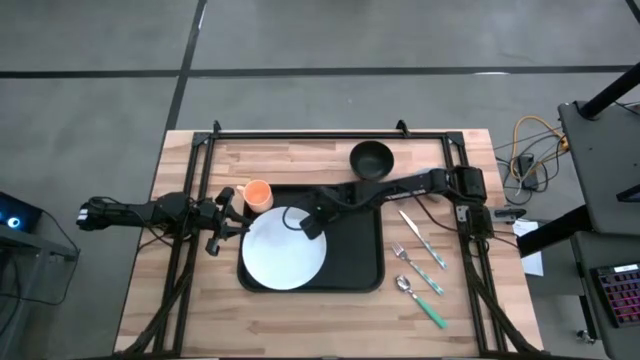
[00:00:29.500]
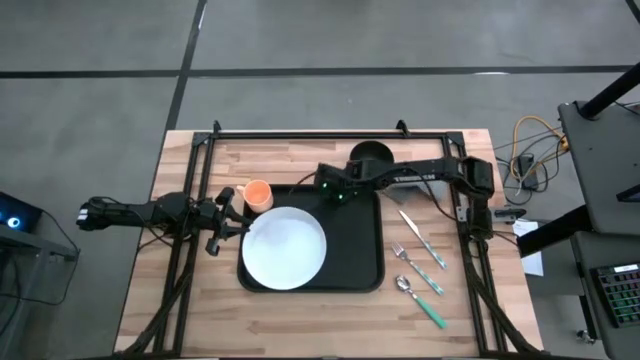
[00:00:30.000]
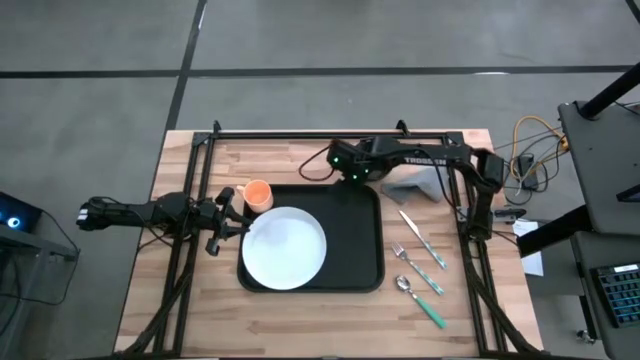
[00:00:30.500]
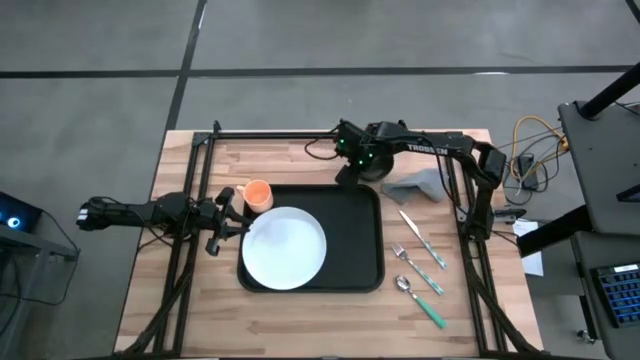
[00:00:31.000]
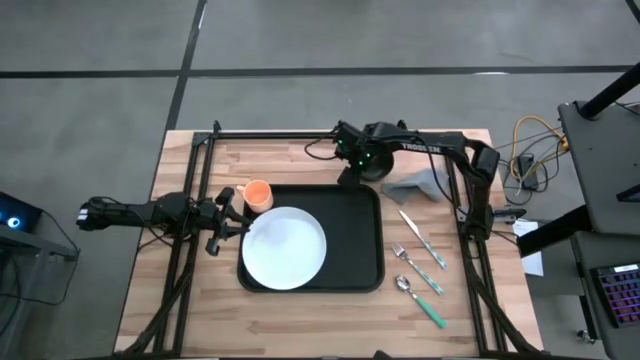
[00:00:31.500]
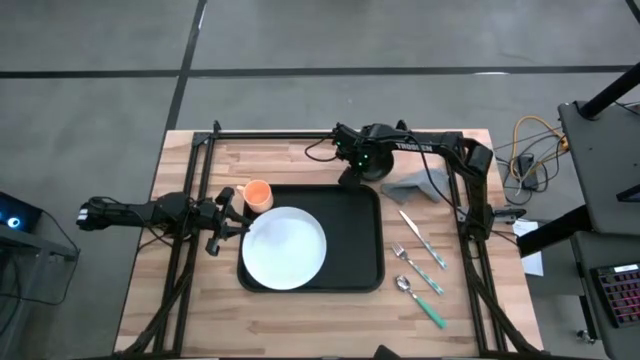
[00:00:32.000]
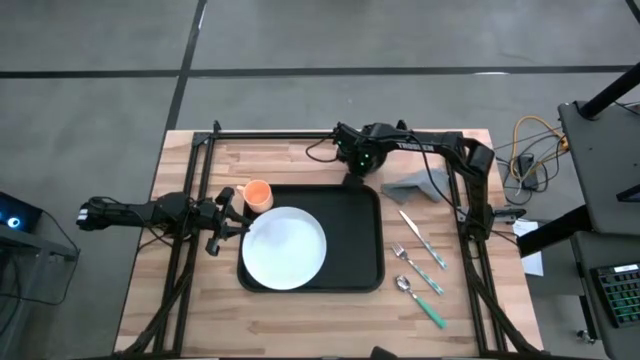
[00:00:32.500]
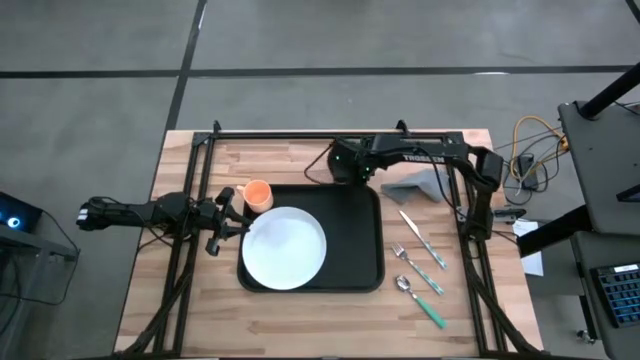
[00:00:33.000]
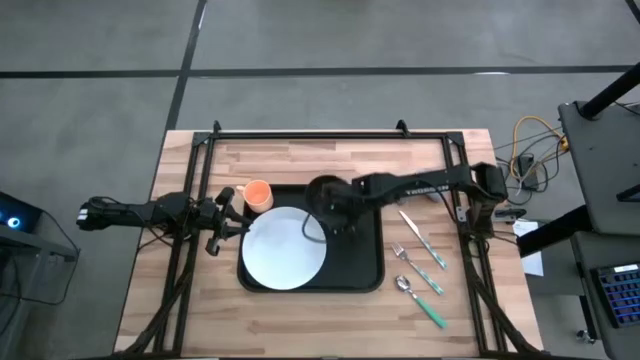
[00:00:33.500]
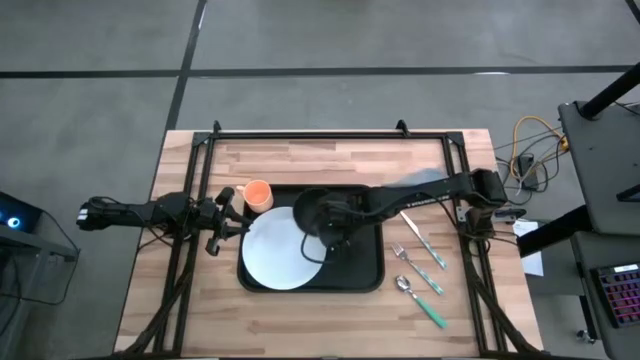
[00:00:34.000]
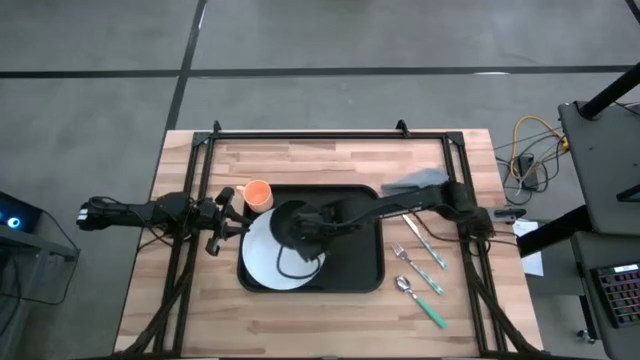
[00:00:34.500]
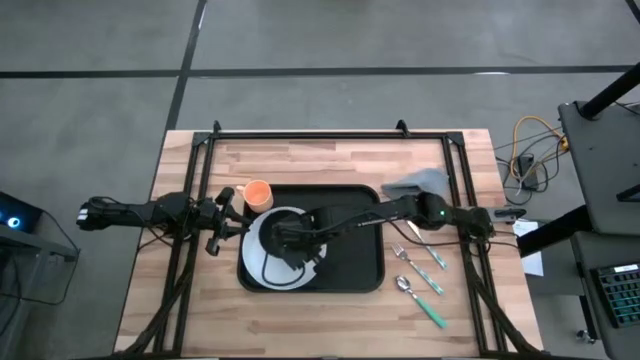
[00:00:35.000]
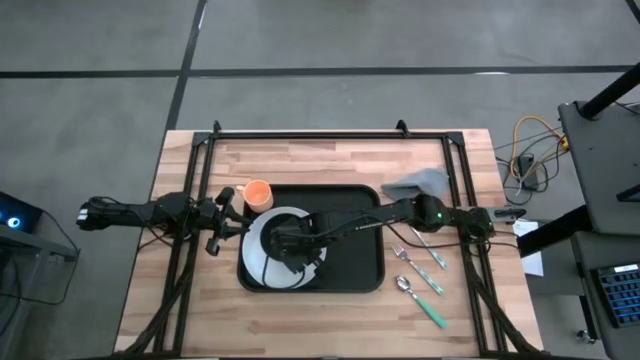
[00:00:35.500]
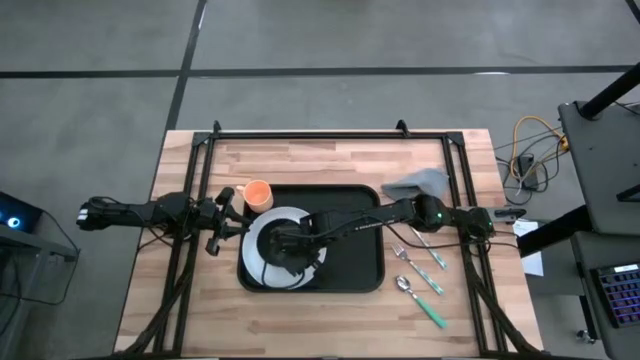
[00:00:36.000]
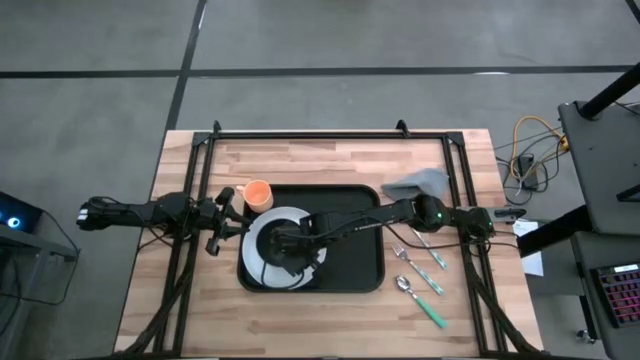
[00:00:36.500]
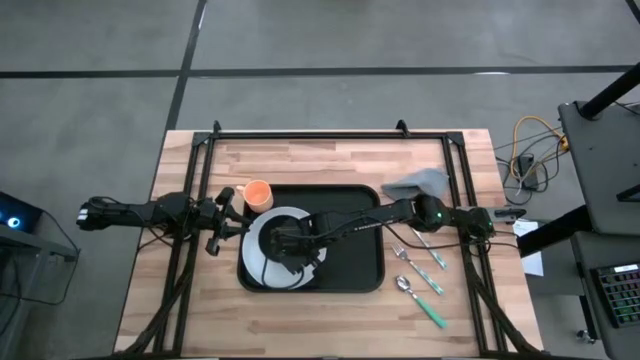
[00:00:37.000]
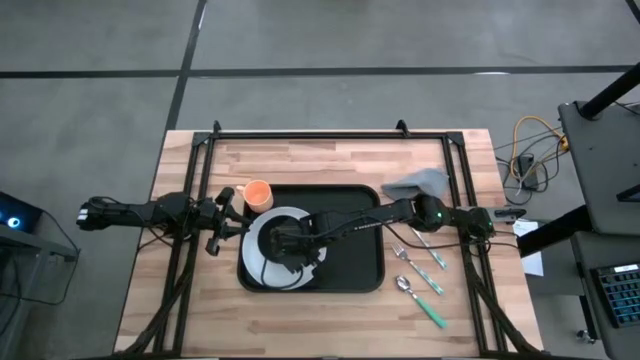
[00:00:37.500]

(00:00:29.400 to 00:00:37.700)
Task: Set up tray
Put the black bowl on top of the white plate

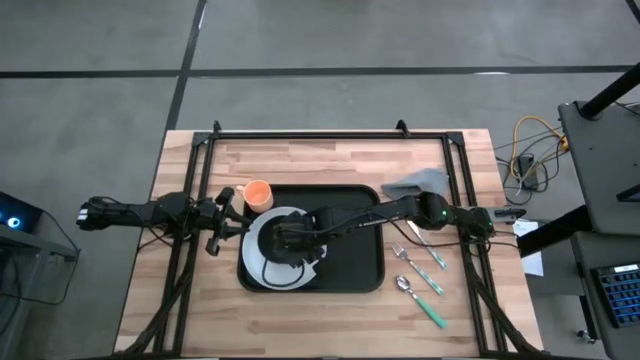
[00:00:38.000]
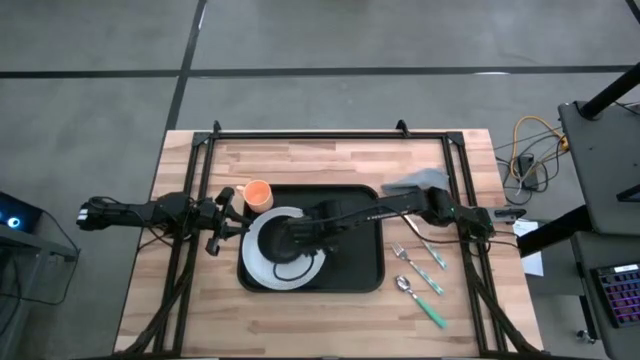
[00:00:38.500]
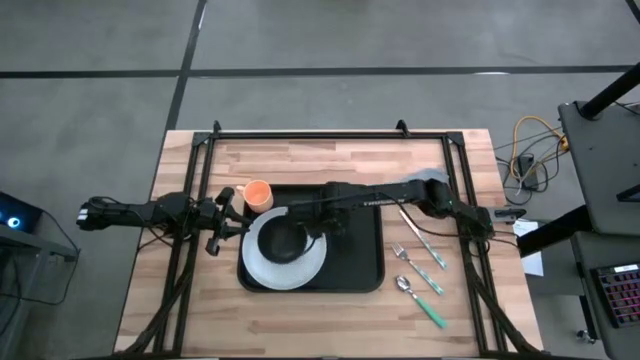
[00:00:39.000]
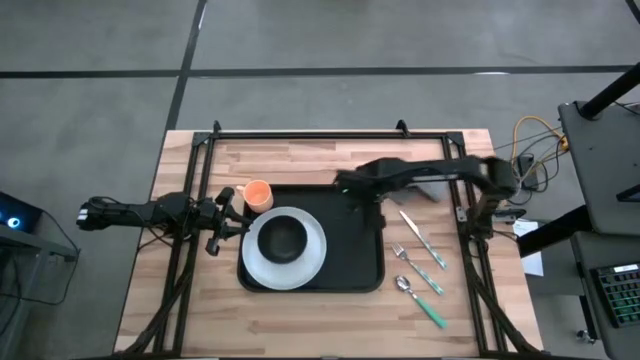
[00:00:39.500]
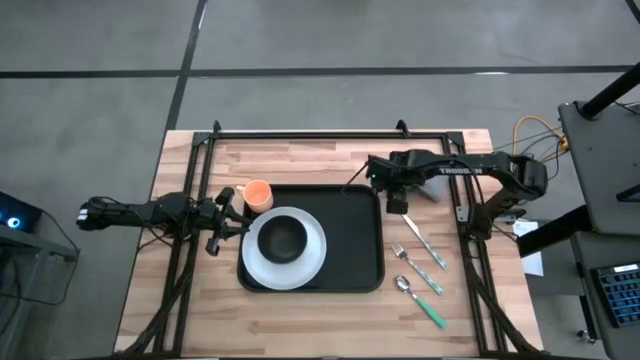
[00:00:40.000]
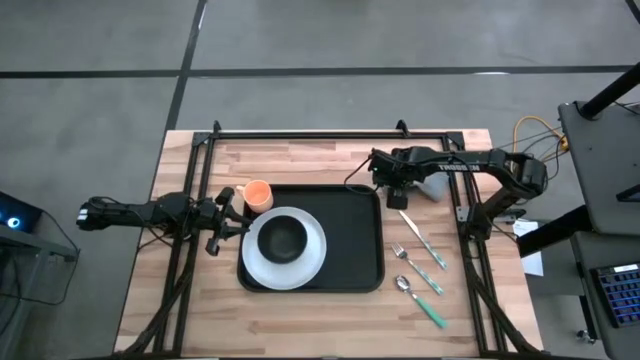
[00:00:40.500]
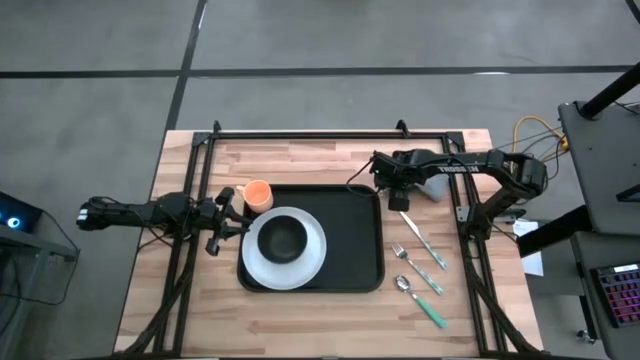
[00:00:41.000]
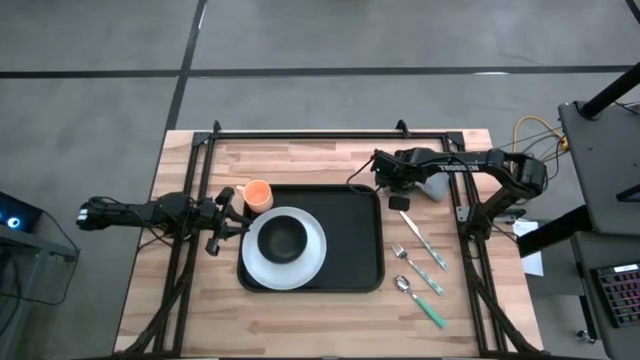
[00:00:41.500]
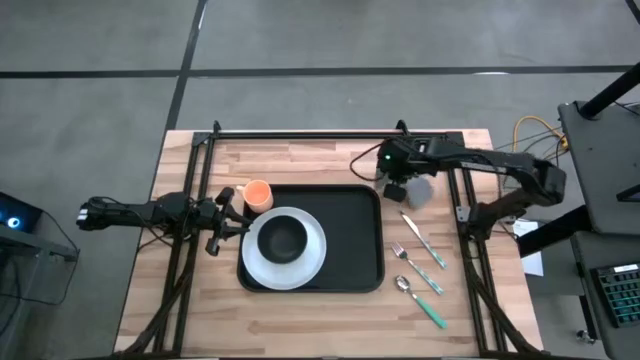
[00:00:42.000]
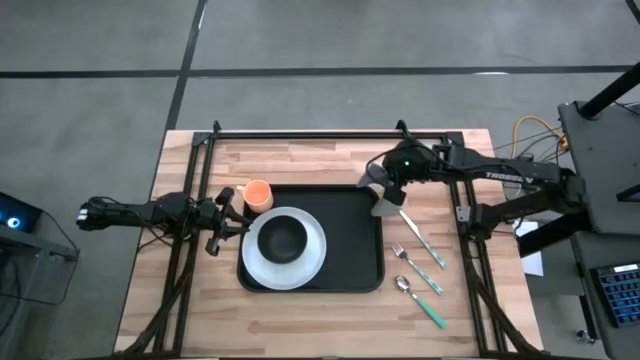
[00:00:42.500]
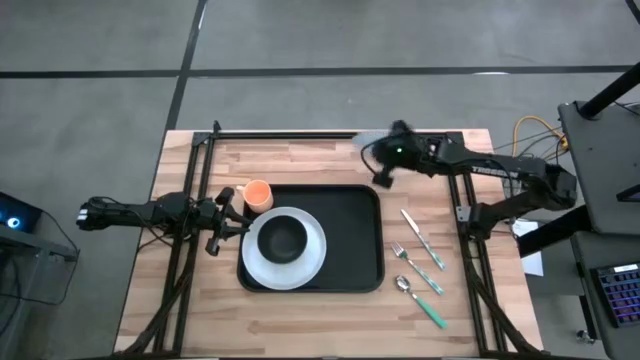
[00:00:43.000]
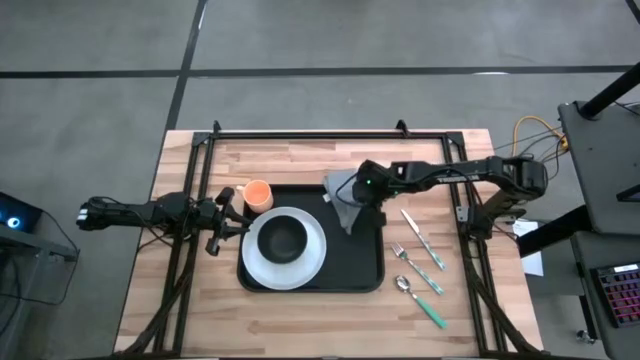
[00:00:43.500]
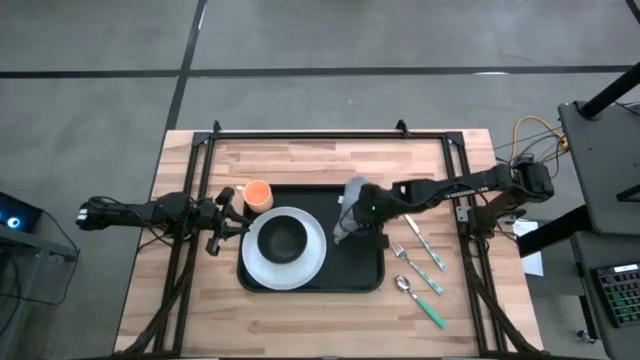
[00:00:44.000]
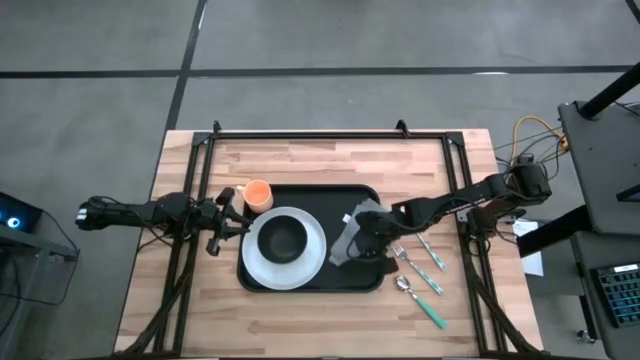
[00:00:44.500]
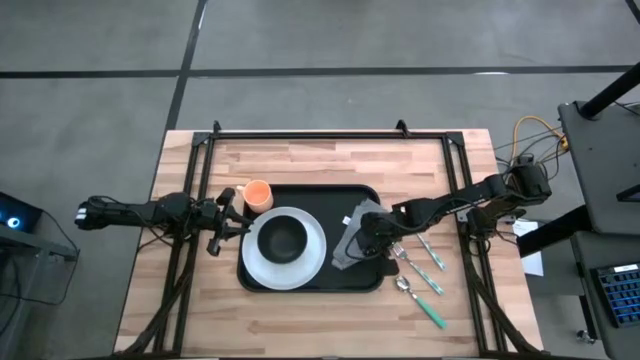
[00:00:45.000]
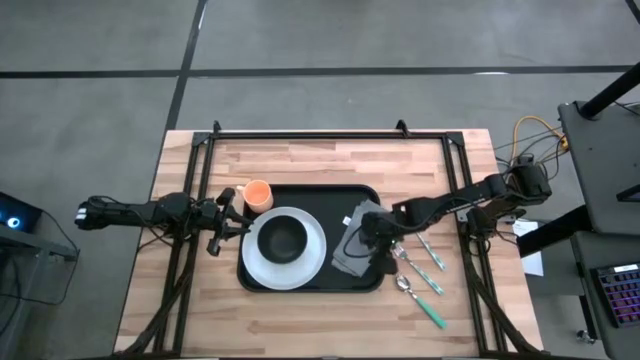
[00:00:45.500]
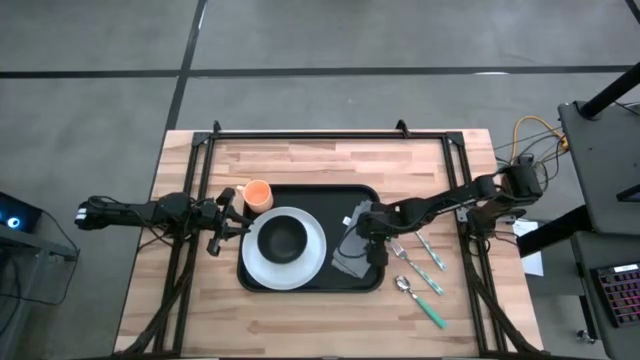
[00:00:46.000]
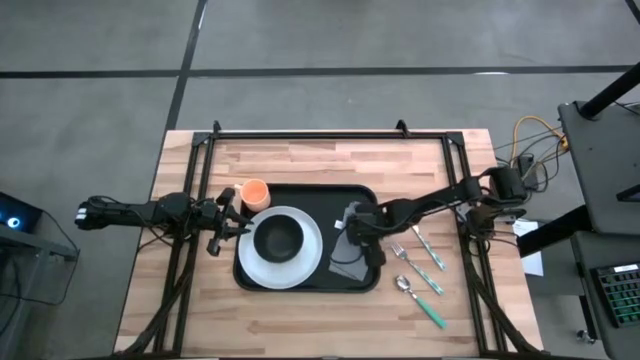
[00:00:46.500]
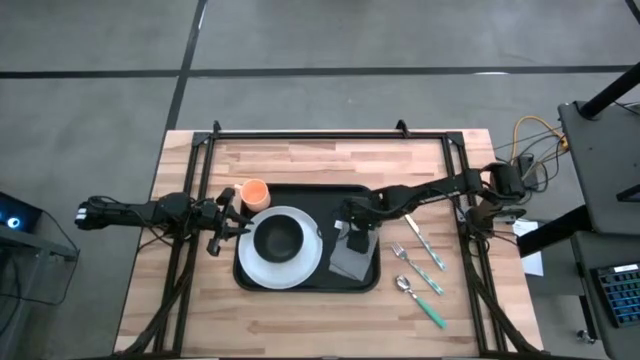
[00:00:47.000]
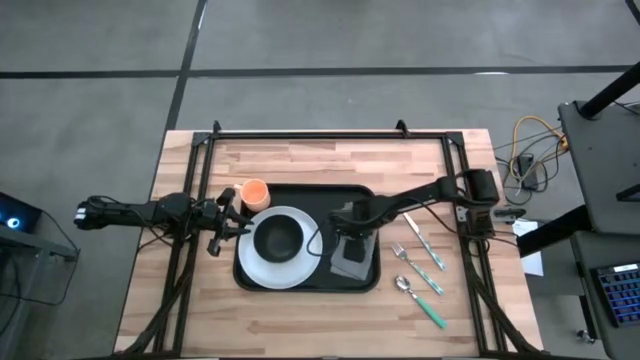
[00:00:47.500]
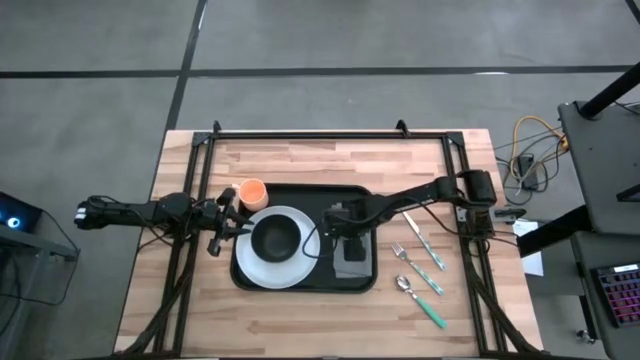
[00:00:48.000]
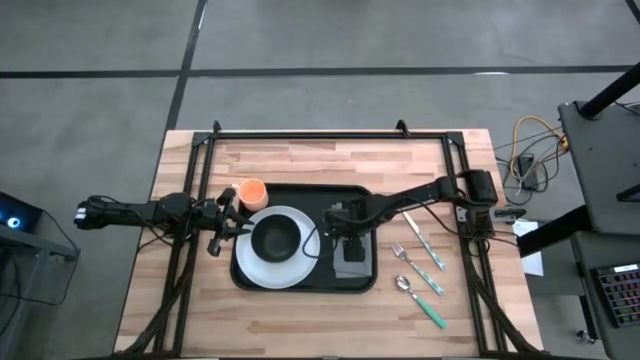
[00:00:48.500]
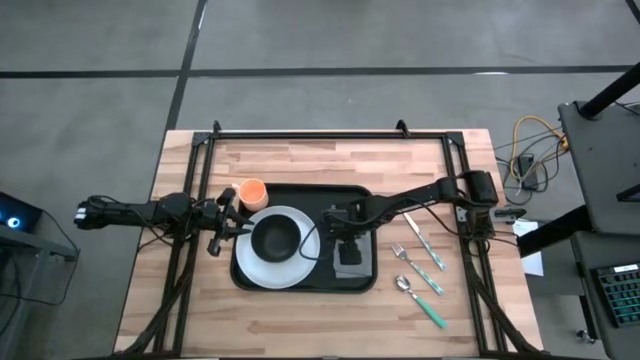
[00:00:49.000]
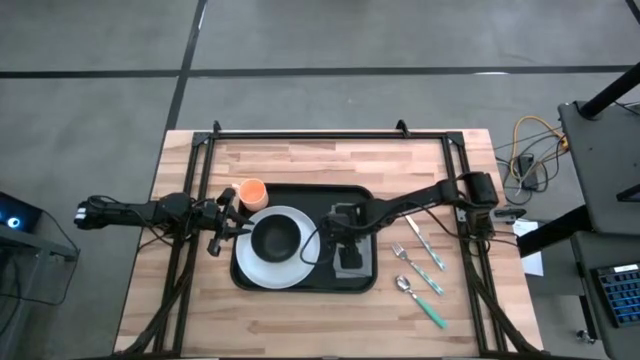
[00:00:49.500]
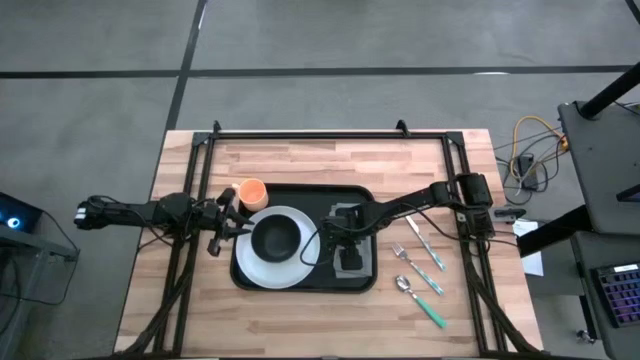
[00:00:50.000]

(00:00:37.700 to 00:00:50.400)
Put the gray napkin on the black serving tray
